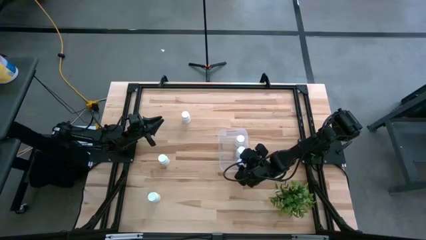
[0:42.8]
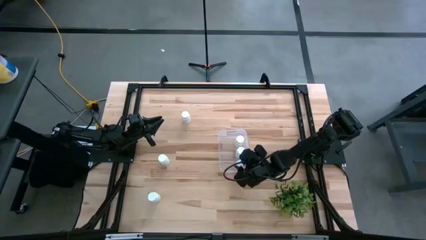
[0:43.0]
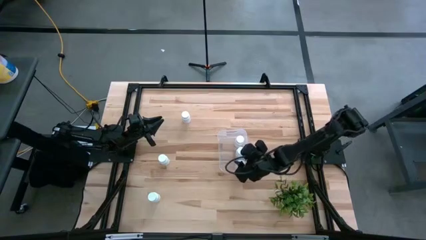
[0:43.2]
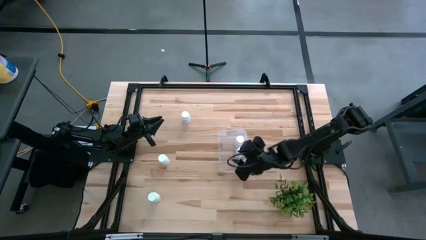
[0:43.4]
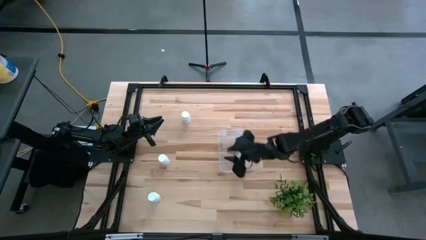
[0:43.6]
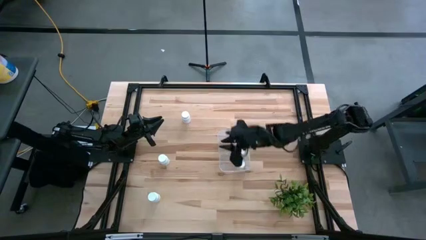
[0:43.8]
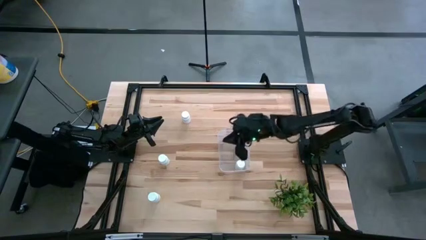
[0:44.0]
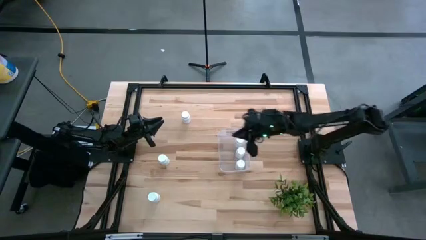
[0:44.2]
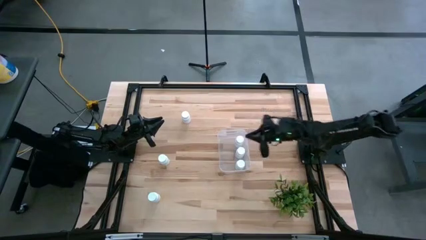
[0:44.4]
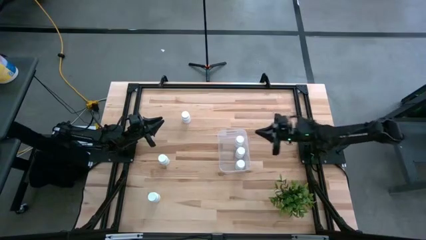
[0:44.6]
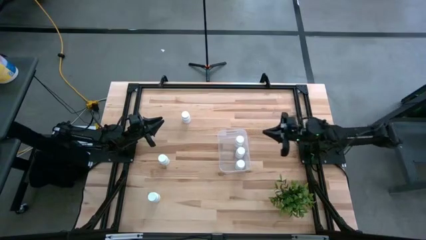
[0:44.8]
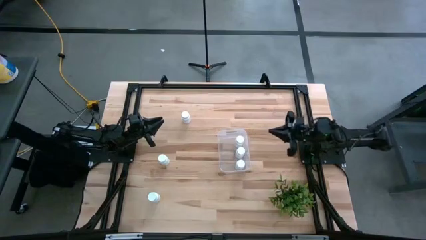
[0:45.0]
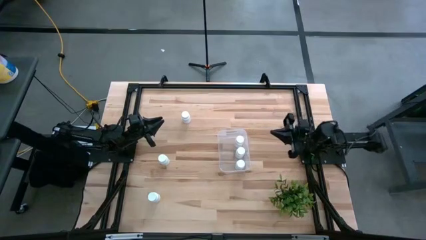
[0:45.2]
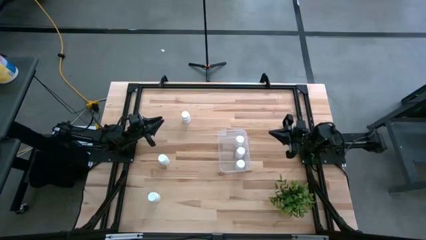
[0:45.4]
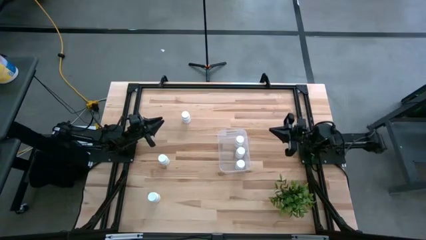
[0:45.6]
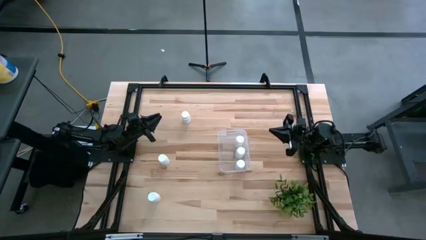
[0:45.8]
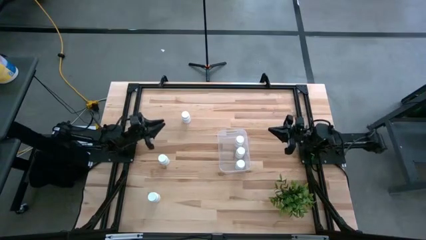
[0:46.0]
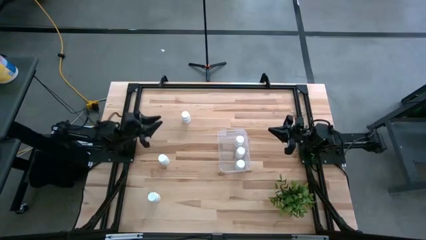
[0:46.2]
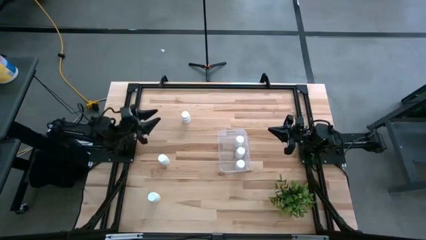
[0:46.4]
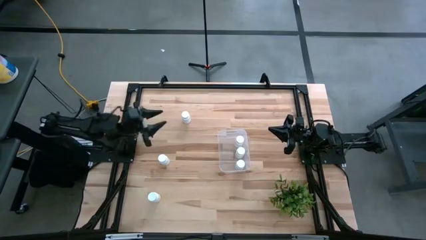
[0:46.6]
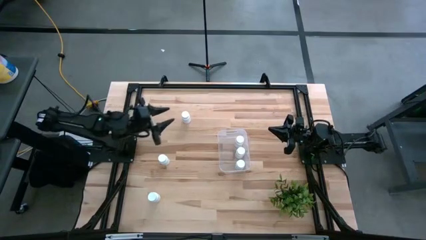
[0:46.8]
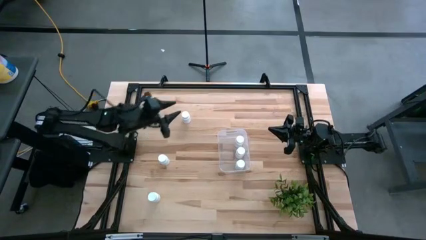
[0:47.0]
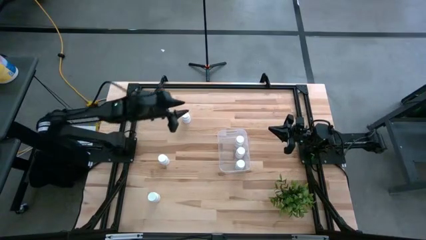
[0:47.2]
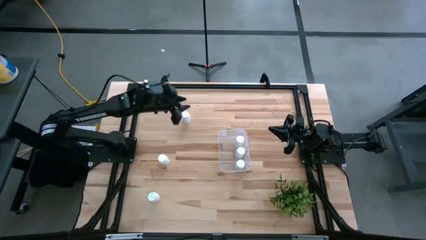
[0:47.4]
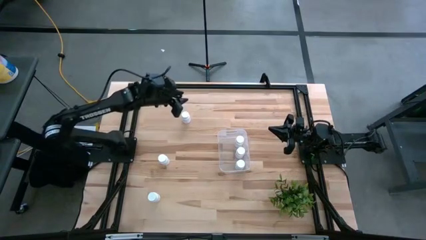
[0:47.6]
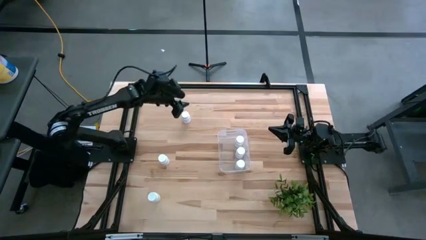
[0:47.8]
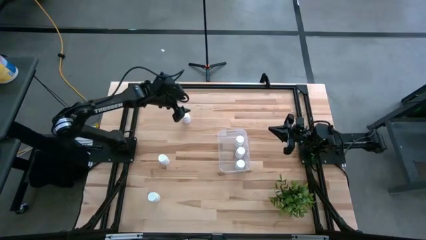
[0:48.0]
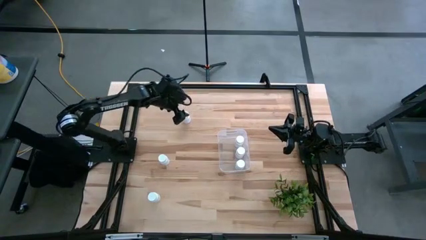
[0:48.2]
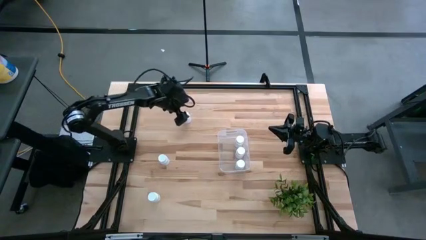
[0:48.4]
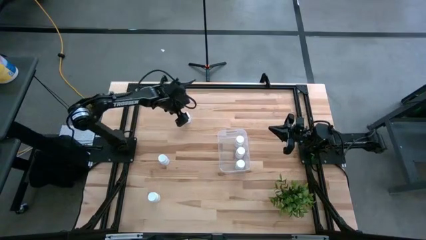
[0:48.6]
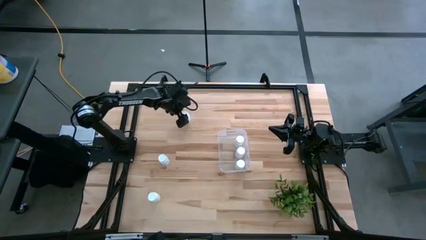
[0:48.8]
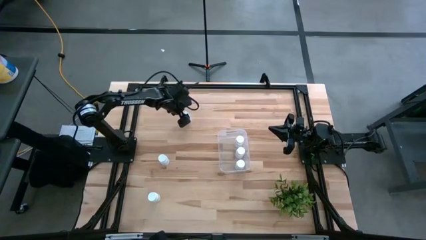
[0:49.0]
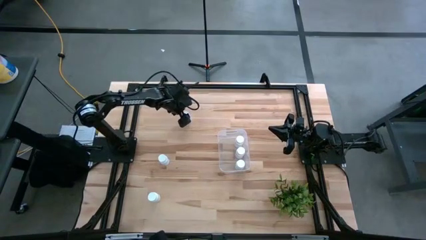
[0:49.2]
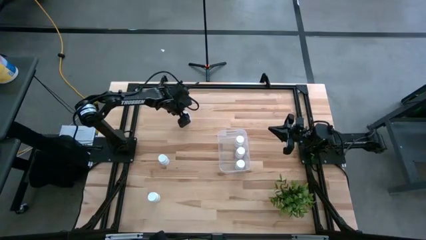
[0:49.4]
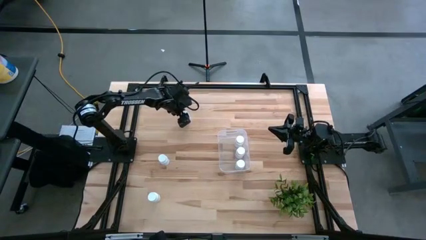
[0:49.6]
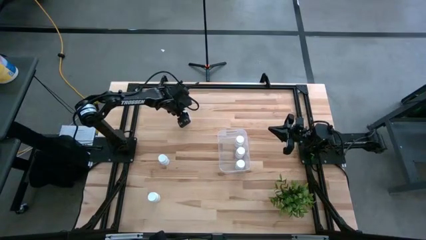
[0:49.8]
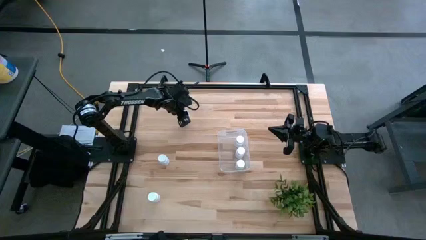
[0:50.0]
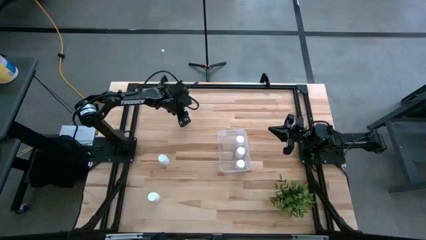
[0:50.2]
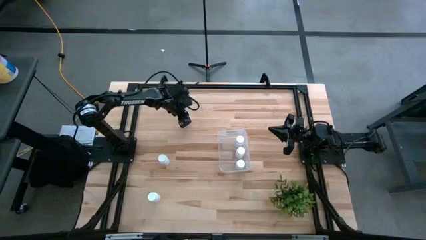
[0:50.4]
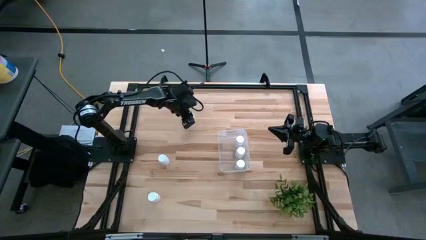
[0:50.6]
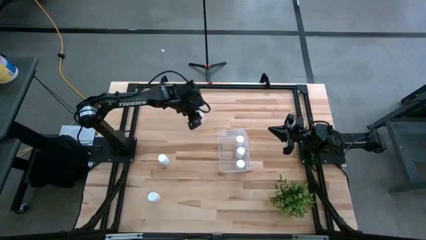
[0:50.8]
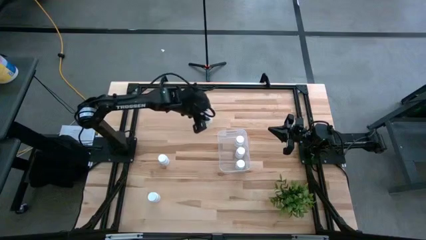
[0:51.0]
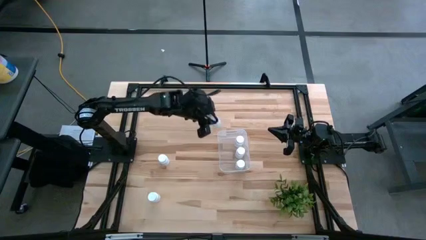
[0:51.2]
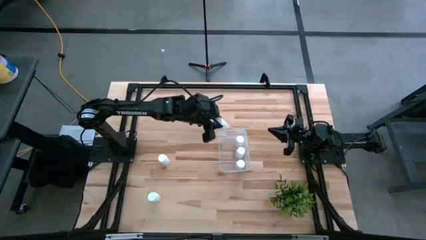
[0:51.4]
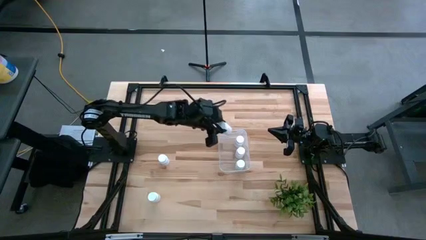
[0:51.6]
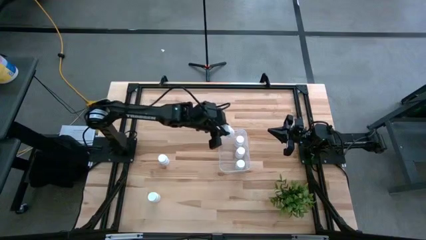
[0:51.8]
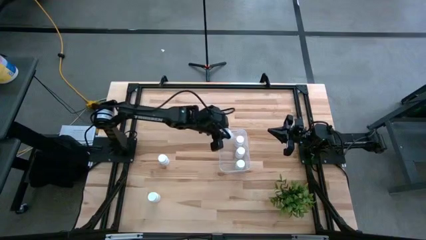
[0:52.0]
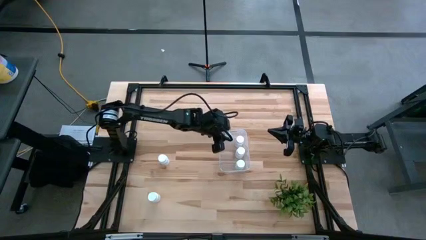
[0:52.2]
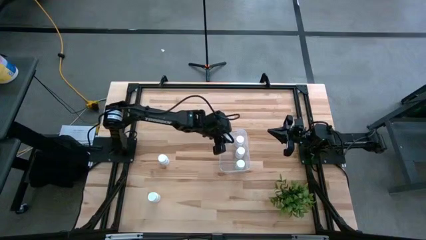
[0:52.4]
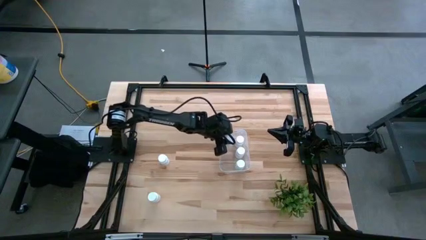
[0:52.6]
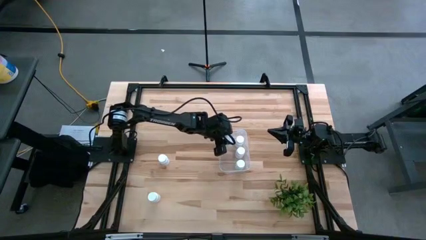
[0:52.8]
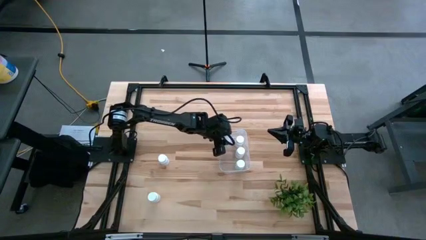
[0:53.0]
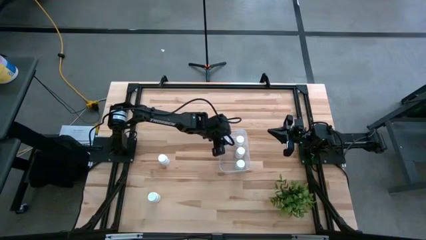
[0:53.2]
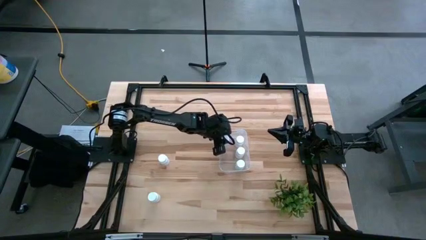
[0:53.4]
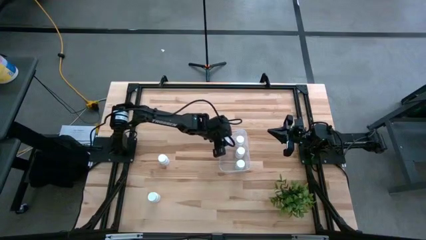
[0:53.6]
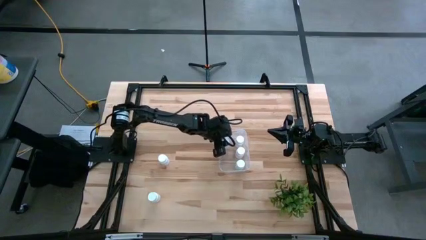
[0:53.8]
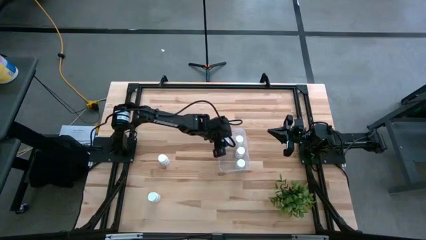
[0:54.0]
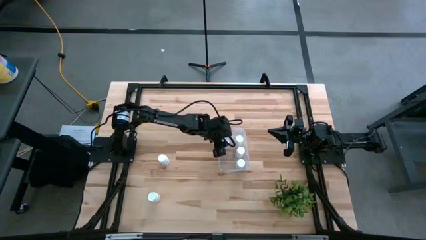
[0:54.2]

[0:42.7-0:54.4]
Task: Pick and place pill bottles into a basket
Put the top pill bottle into the bin

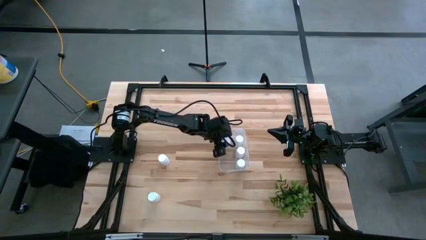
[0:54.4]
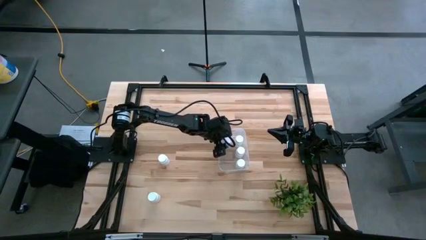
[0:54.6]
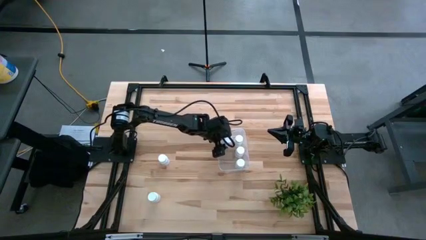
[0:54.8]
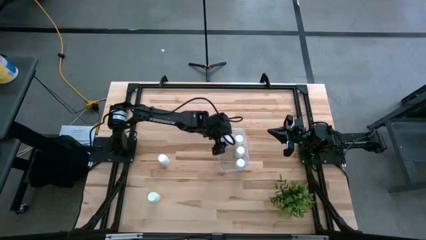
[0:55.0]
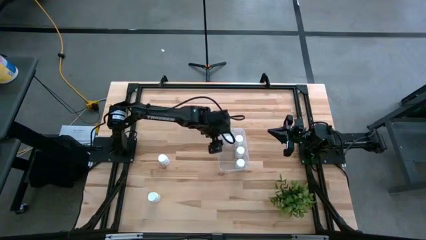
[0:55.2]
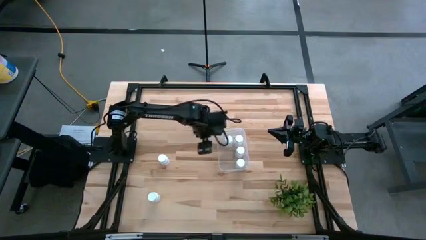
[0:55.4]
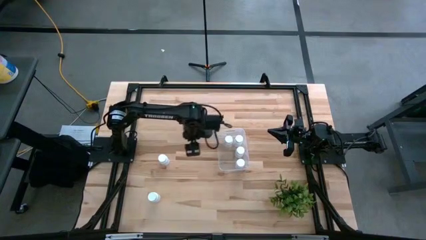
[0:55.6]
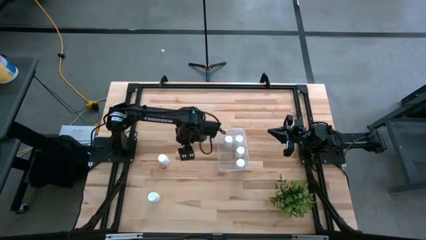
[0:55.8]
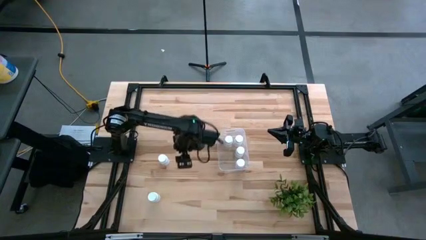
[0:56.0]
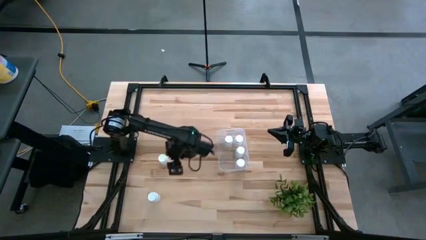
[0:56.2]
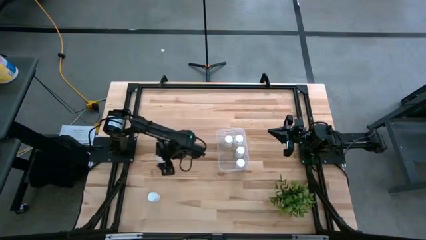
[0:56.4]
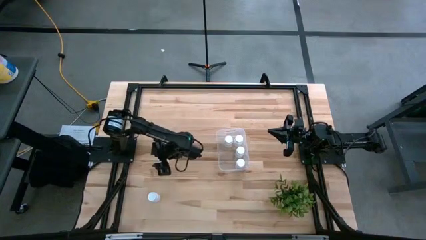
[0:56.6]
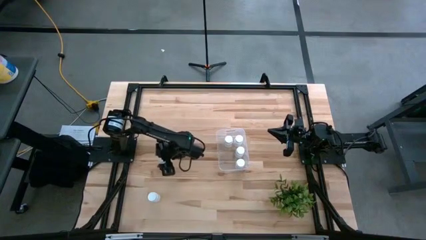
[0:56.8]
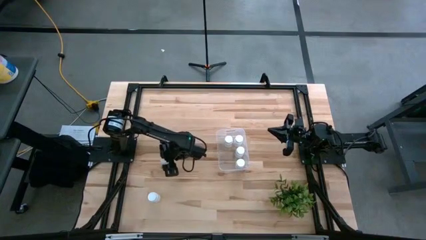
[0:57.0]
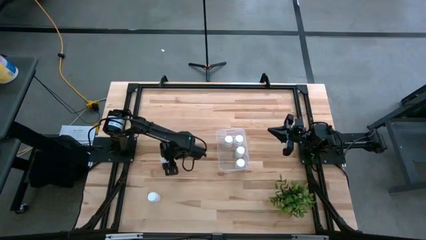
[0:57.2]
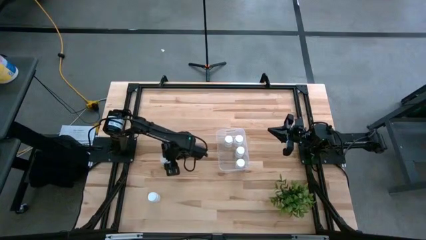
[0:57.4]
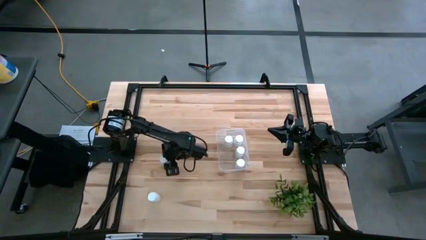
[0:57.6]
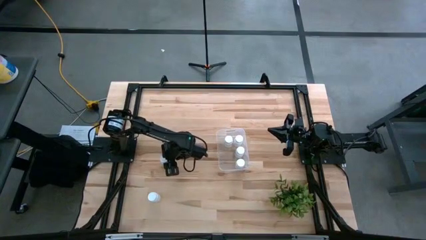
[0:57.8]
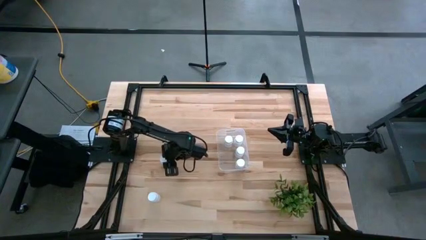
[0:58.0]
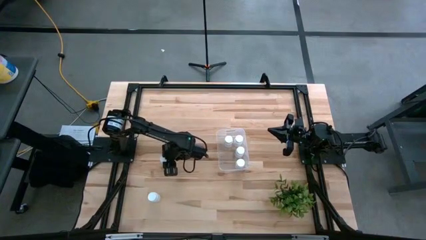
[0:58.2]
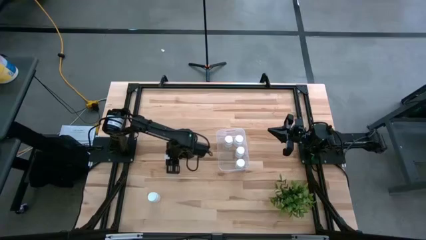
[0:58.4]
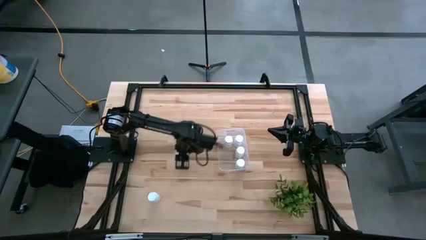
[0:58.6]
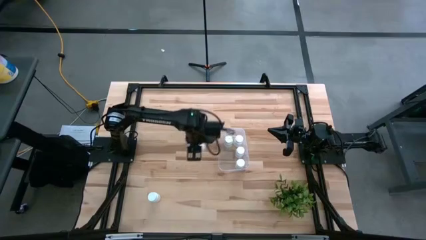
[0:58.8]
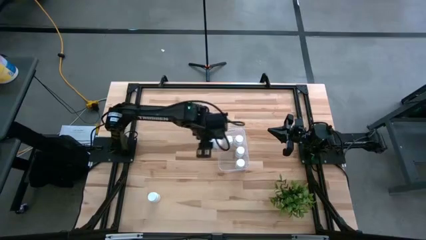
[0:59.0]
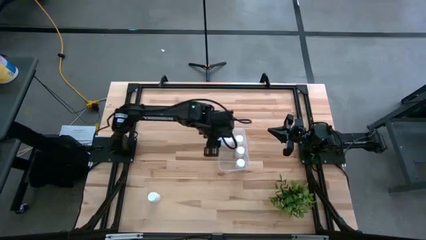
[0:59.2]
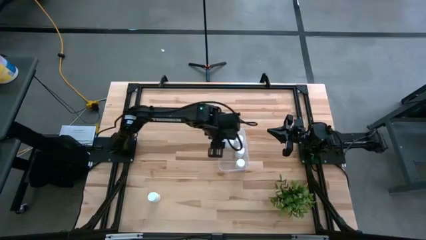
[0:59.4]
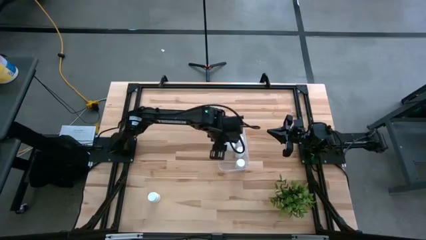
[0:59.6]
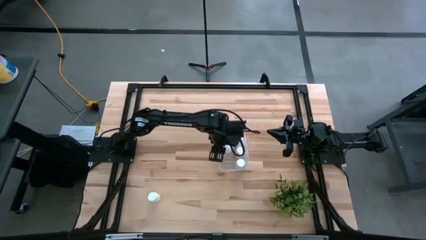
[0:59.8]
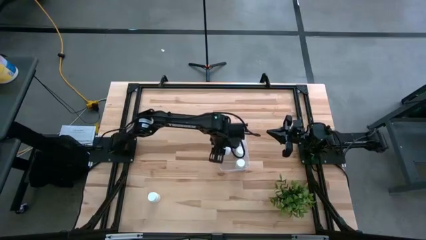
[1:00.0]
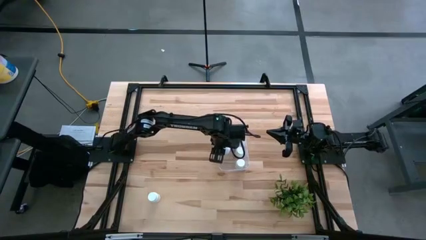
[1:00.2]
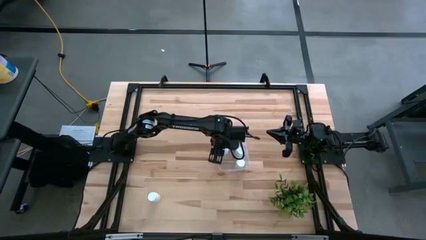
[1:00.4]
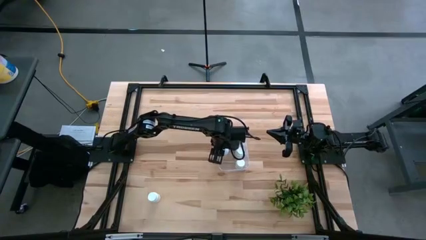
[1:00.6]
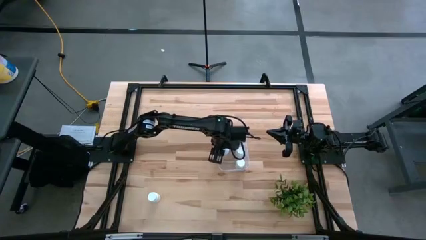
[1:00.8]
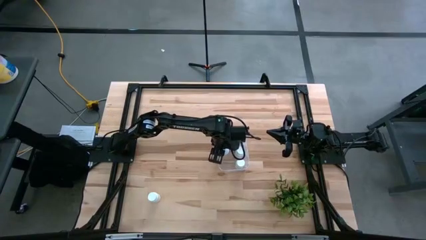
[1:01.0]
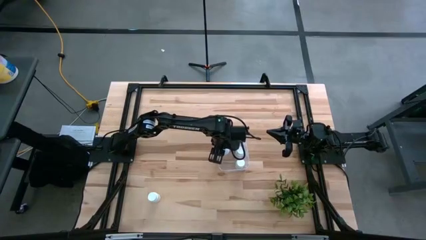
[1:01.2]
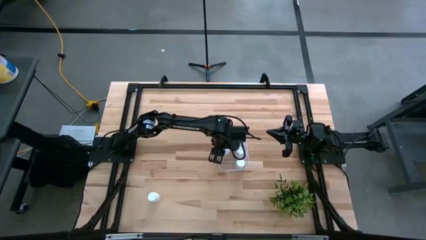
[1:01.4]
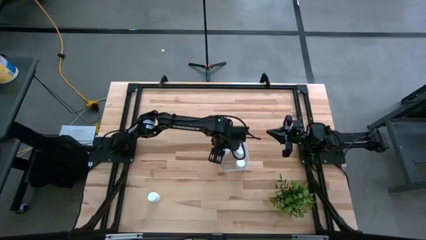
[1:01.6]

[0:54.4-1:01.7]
Put the top pill bottle into the bin
